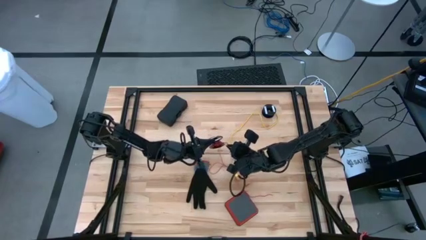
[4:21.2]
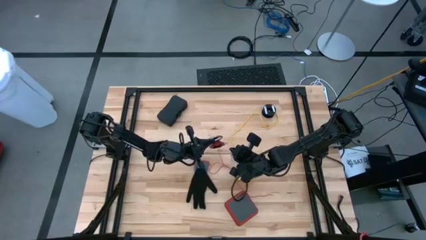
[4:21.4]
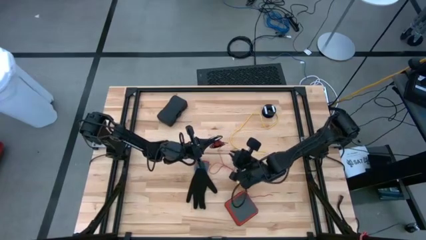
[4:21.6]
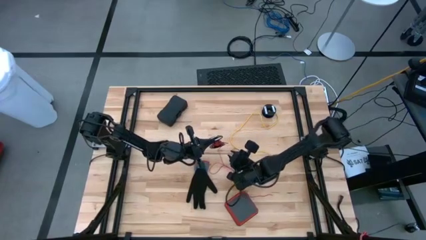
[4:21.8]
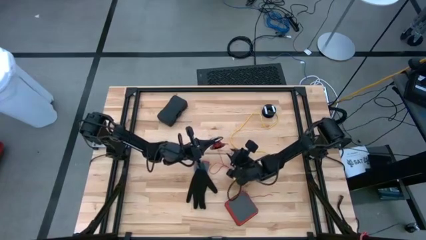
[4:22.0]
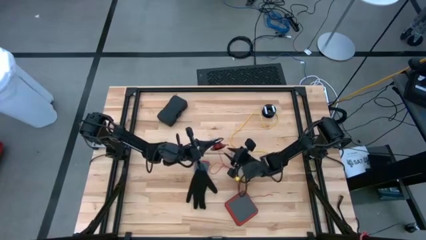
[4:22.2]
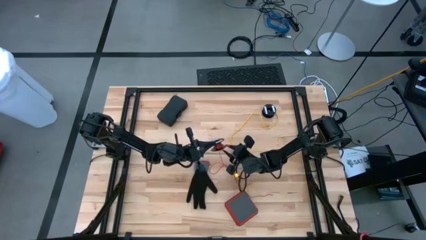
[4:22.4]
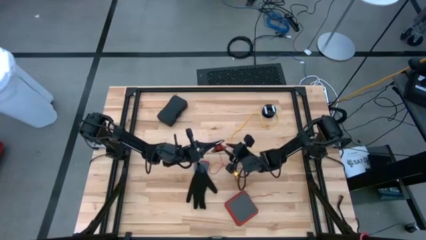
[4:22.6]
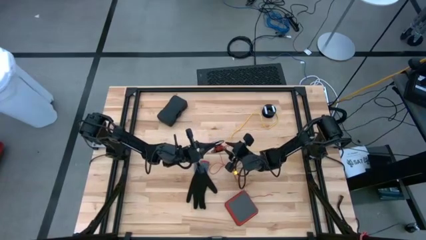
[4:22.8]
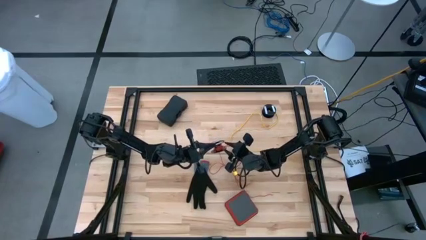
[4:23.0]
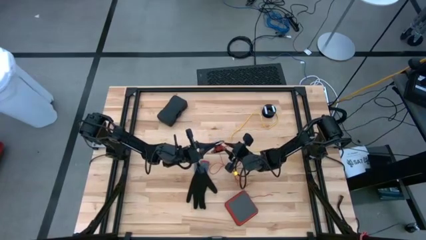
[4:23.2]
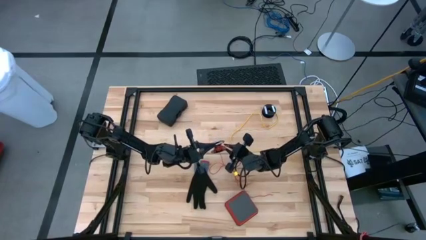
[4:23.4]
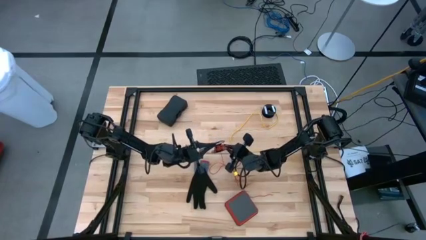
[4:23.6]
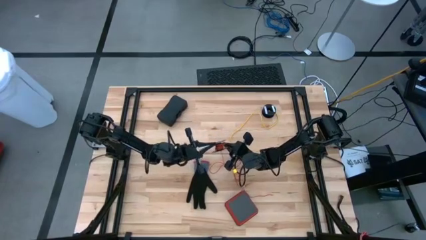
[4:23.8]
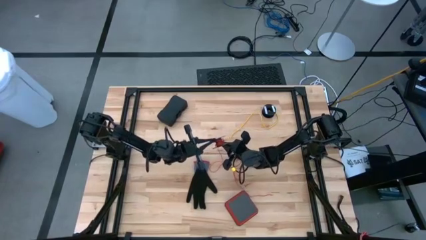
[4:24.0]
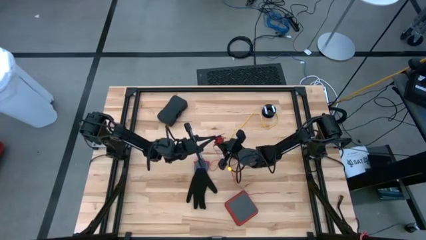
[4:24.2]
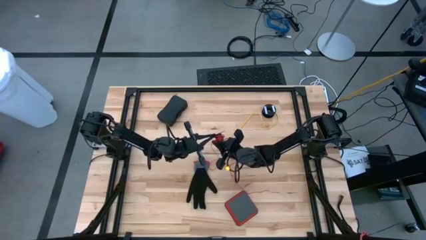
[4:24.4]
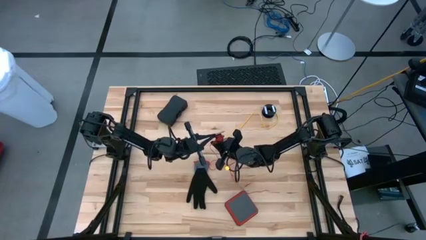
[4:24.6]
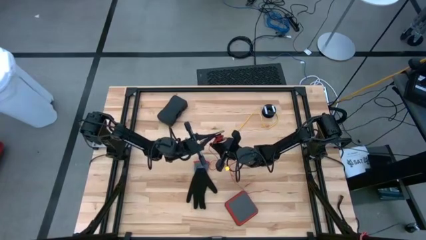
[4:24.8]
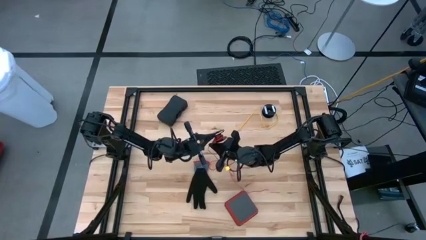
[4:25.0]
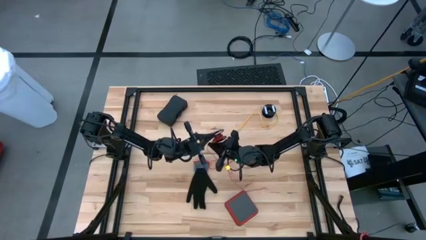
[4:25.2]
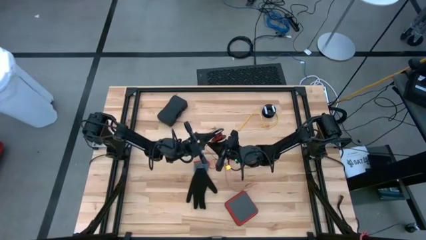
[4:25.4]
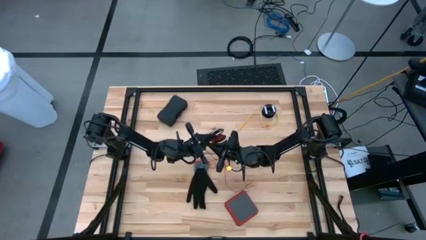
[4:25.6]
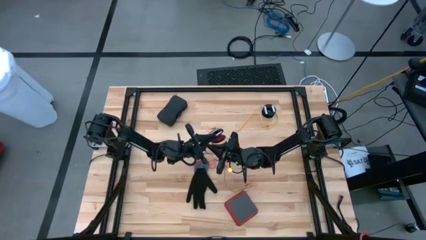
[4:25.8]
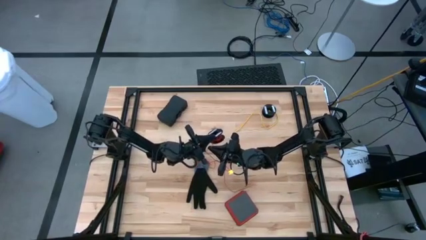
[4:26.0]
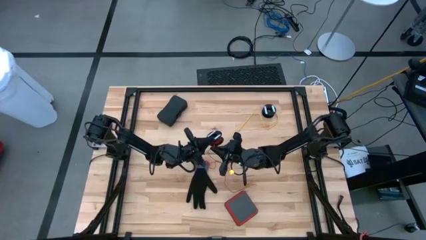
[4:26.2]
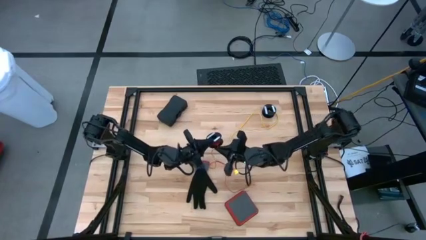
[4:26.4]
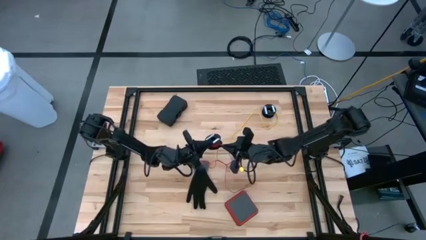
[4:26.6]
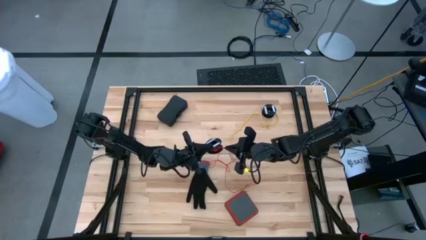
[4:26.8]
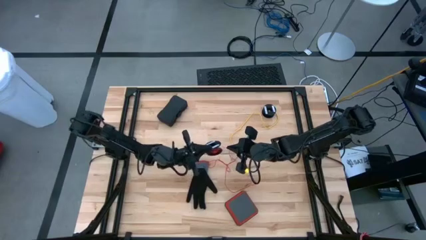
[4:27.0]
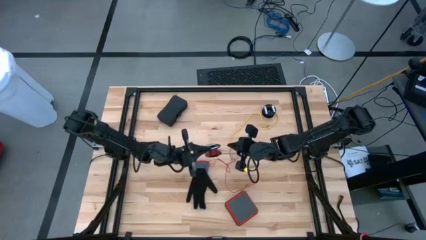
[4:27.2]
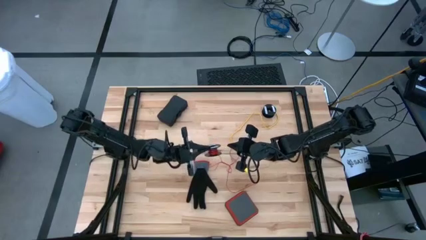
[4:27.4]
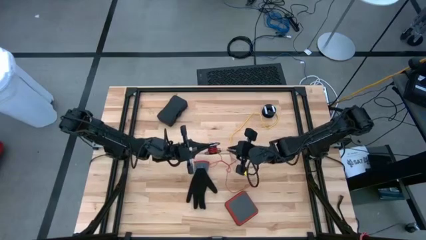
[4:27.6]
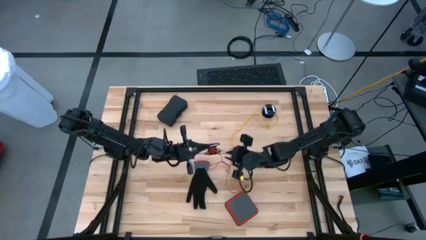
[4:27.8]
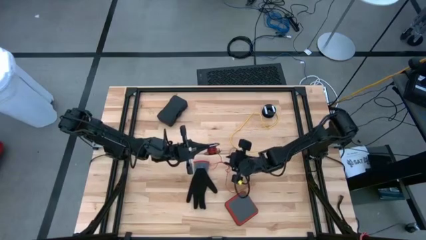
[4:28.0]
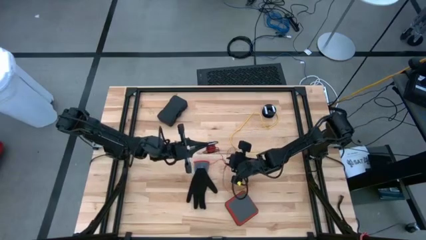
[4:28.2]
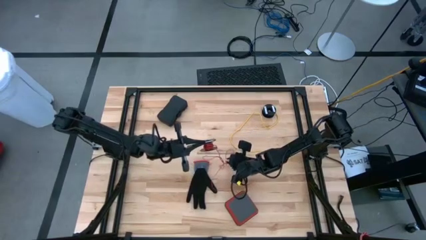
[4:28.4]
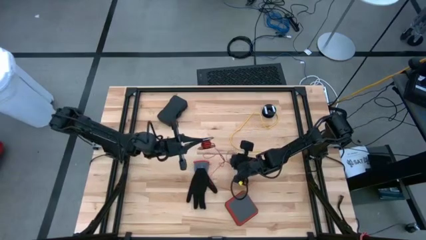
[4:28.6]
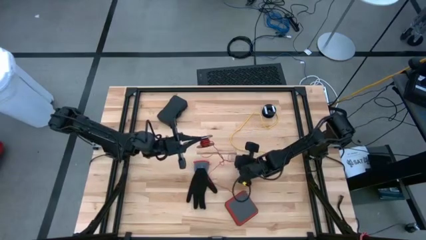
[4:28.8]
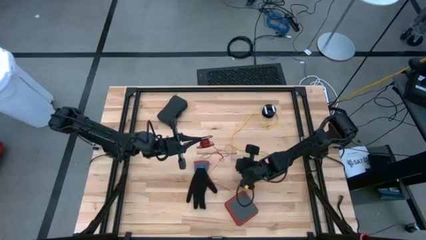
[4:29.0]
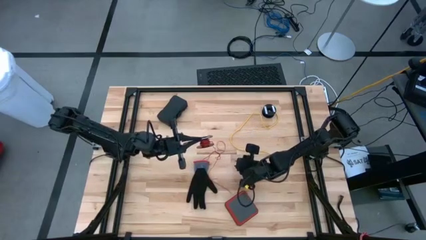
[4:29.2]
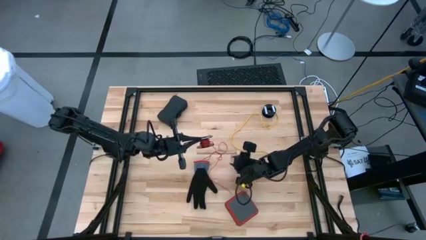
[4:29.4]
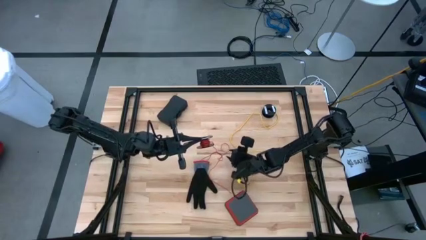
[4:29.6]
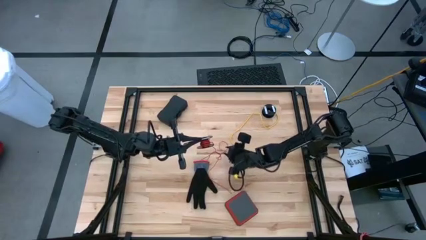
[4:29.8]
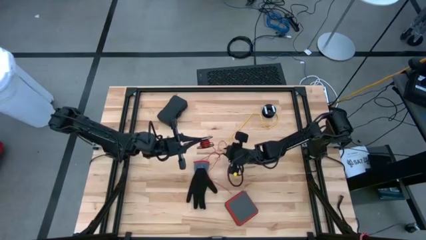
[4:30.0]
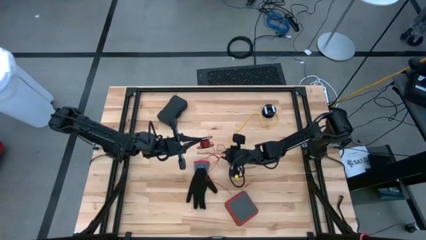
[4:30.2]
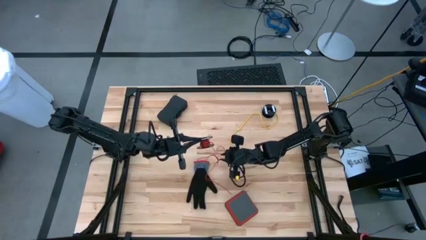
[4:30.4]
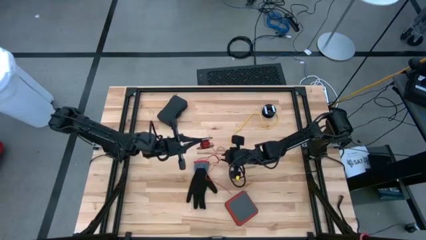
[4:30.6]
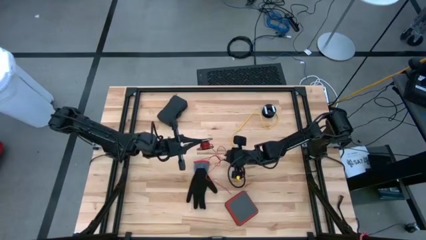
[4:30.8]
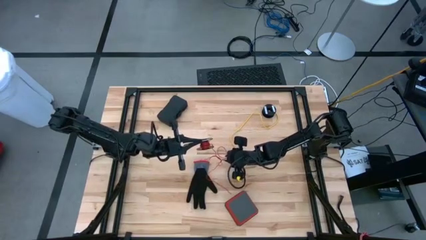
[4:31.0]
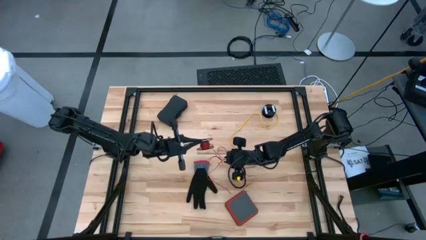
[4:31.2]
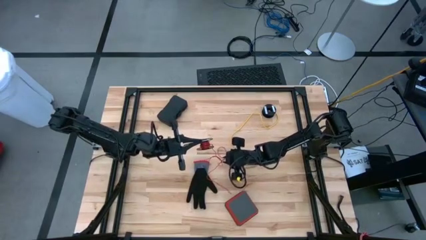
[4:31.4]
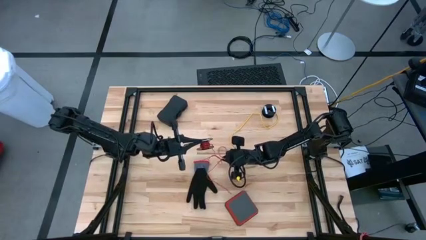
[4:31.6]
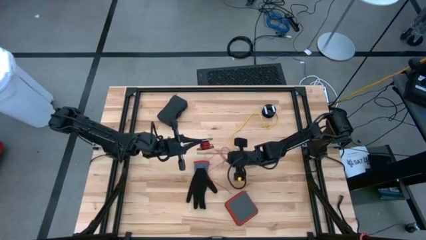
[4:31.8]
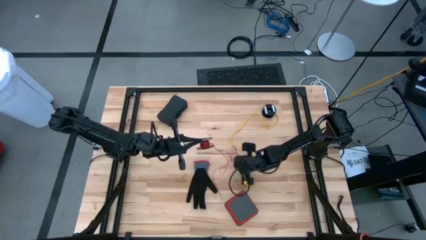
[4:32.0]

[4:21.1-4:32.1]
Task: Coil cords
Coil the red wire onto the black spool

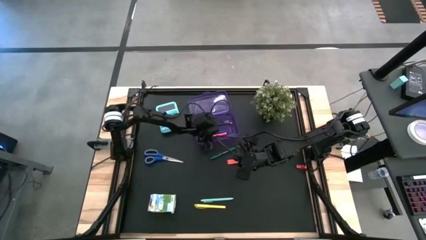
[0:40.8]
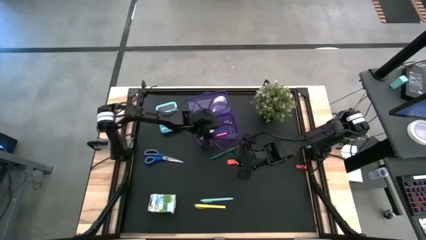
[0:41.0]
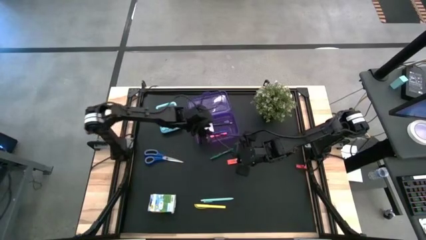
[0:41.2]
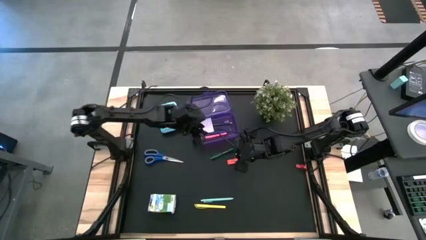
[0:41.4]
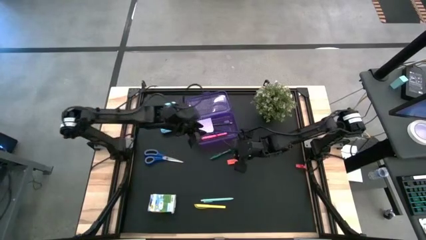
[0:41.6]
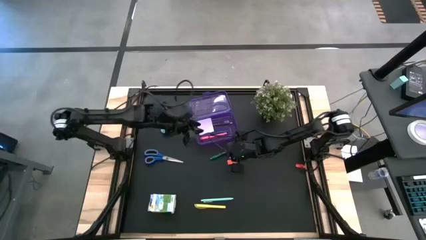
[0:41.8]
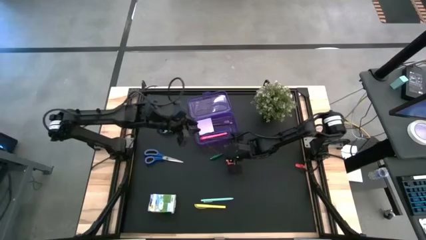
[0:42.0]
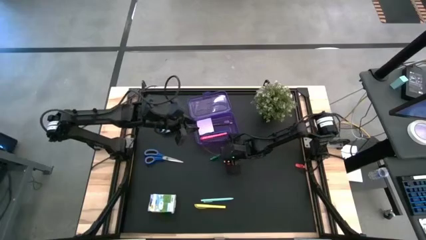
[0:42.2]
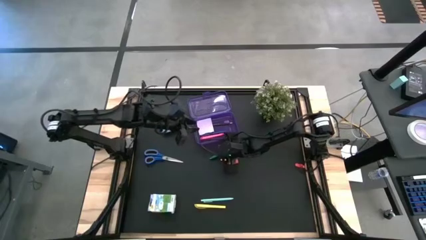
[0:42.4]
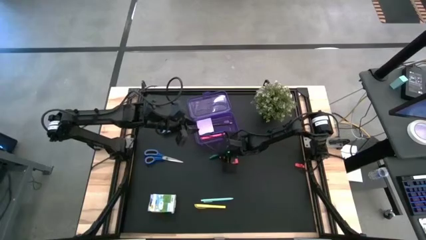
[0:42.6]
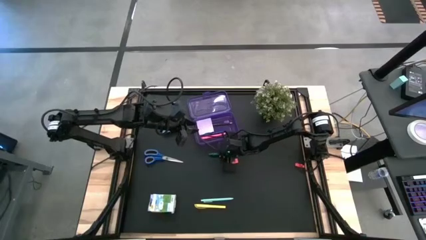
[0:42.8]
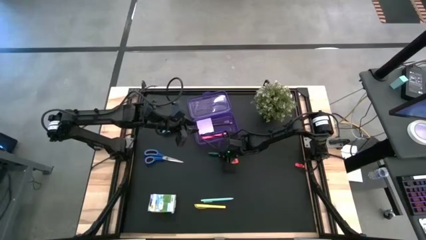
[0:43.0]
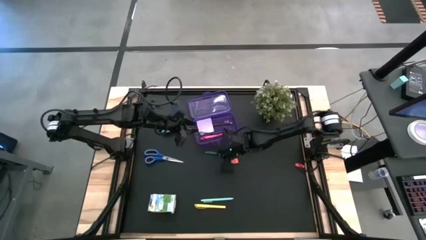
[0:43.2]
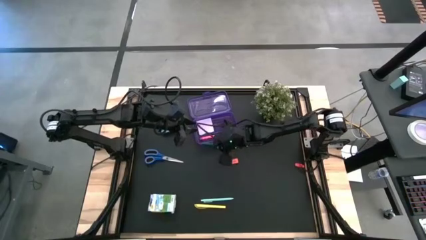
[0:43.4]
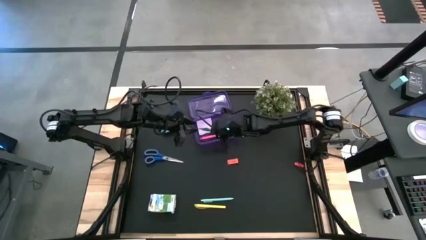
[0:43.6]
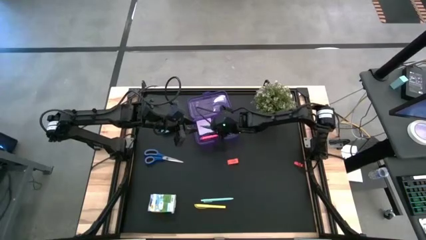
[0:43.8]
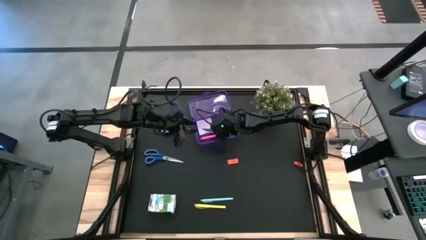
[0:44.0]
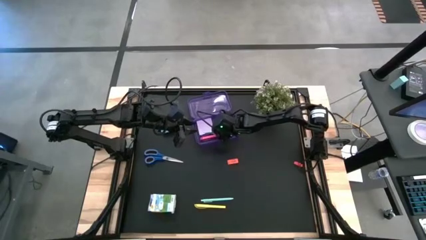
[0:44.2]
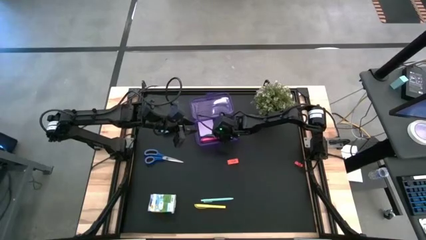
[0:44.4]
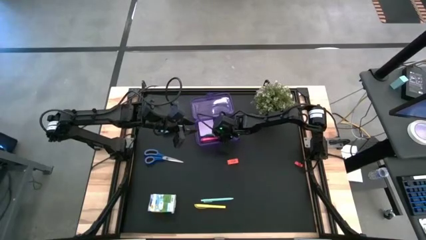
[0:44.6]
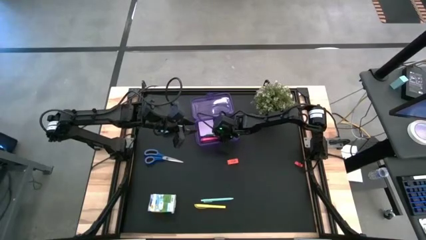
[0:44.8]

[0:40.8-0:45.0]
Task: Pack school essentials
Put the green pen into the purple supply box
